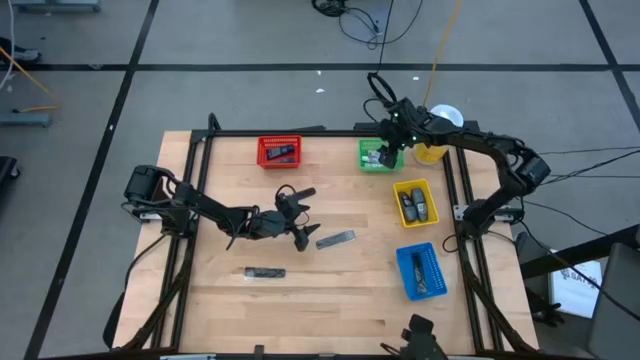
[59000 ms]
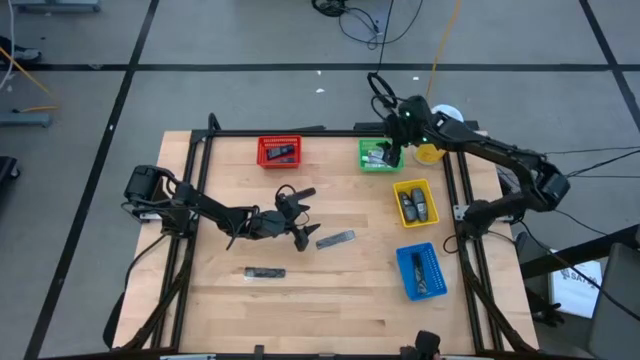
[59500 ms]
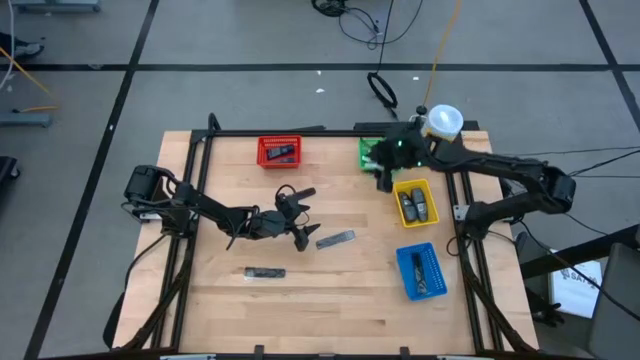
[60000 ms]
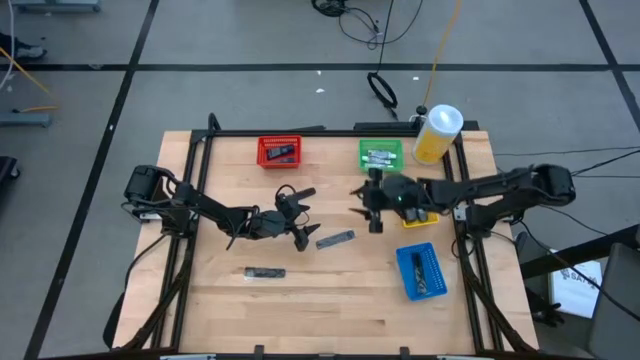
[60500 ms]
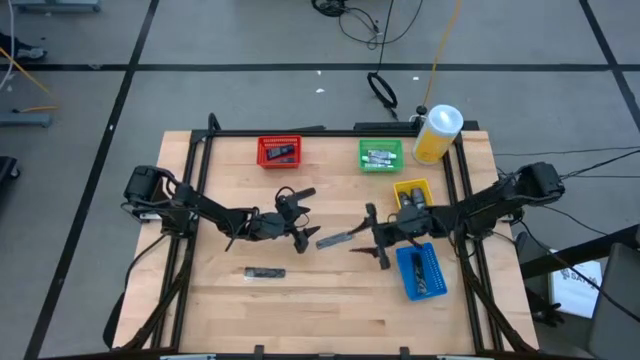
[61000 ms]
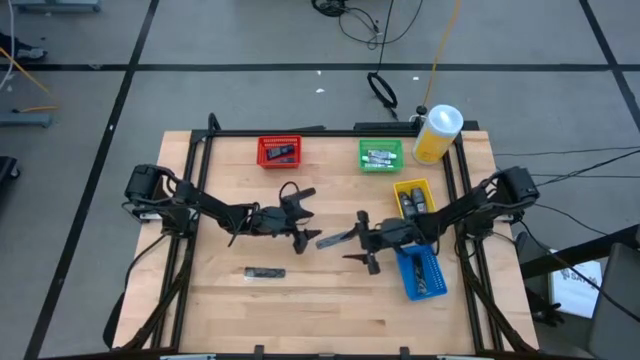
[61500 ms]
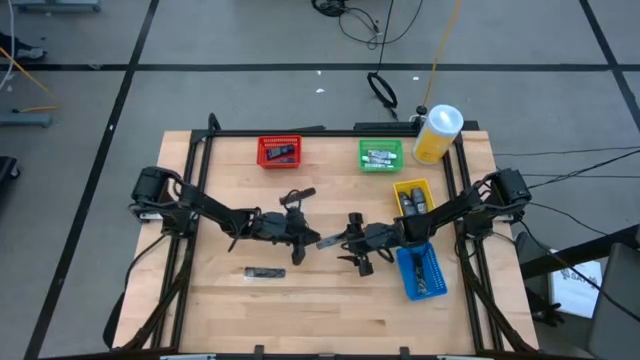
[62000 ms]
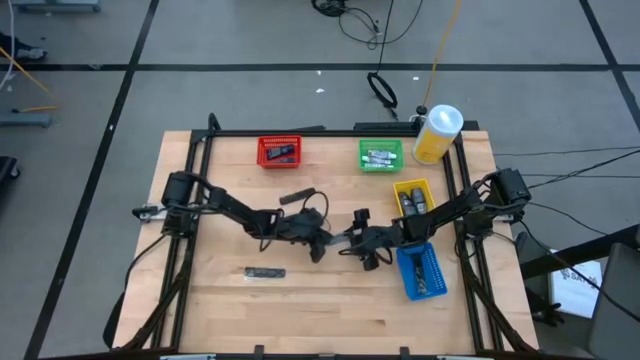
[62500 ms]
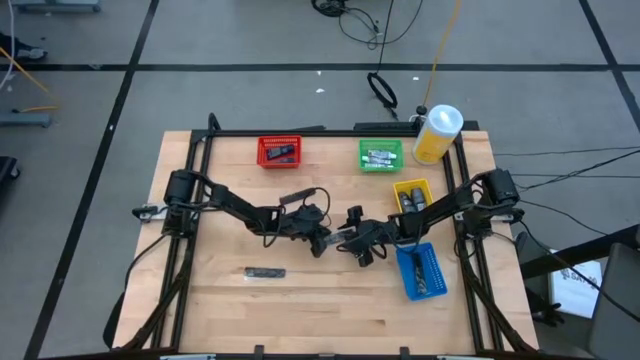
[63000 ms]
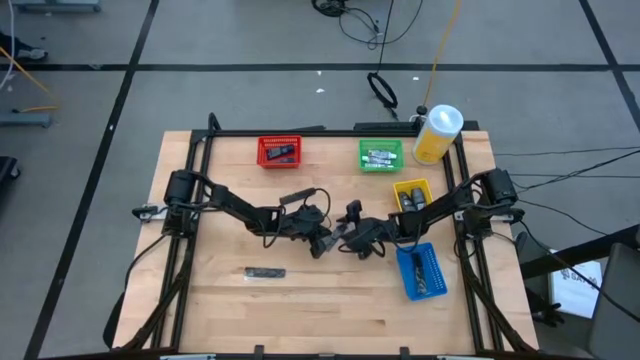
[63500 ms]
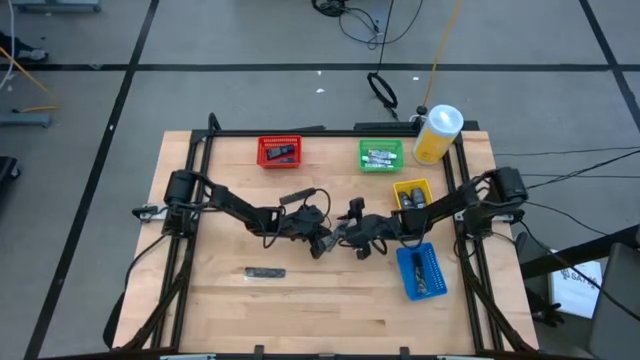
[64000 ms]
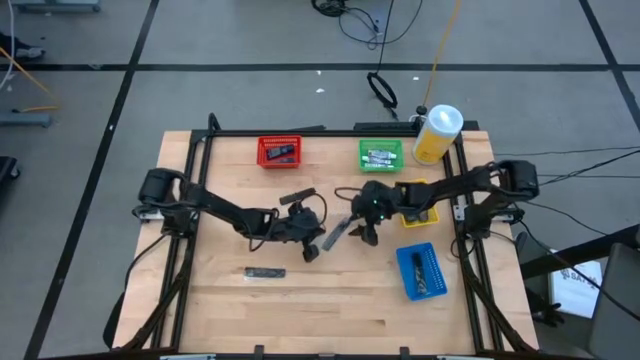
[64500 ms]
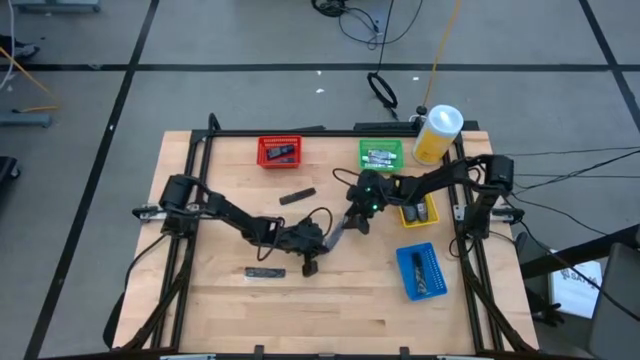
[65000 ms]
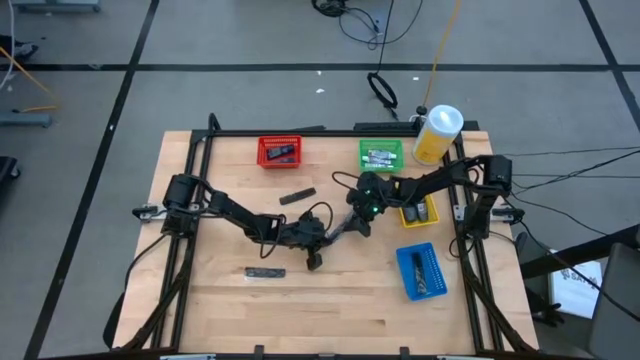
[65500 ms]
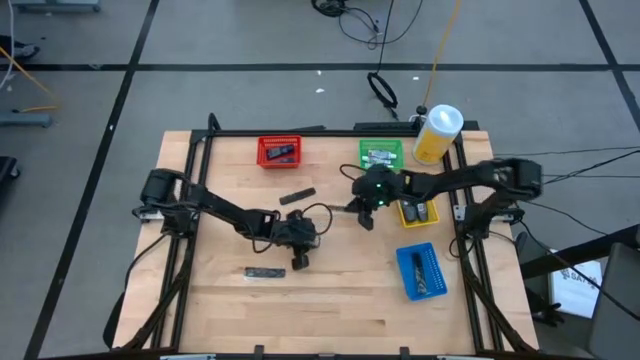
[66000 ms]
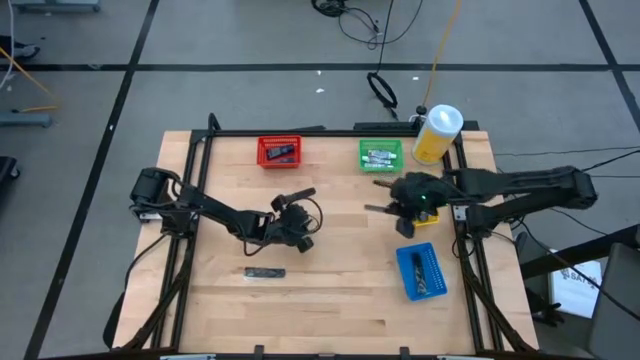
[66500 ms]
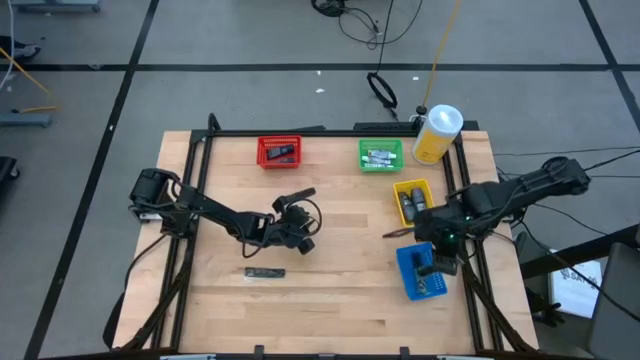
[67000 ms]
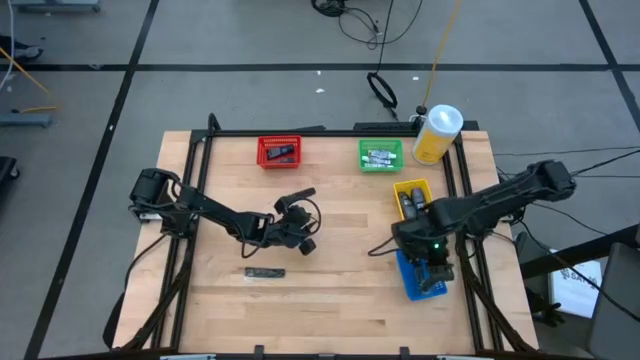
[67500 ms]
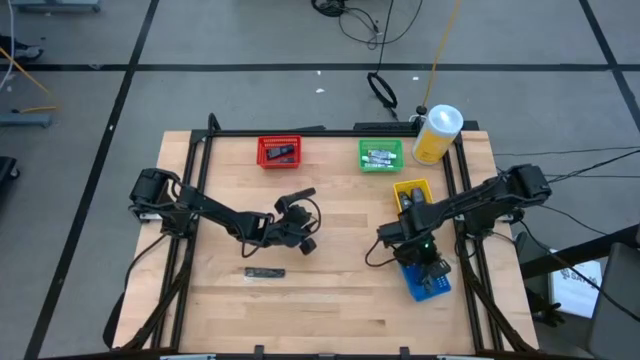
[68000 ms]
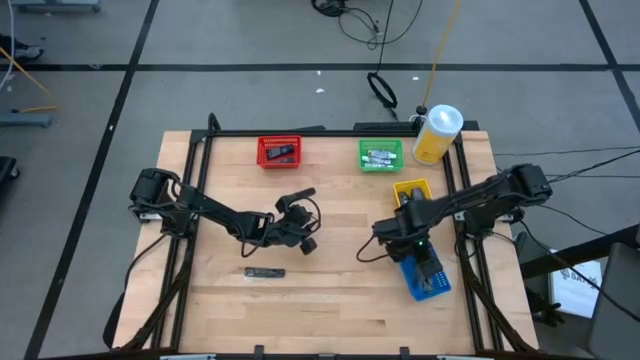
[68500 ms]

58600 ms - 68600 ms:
Task: Pick & Place Travel size toiletries
Put the black comb into the blue bin

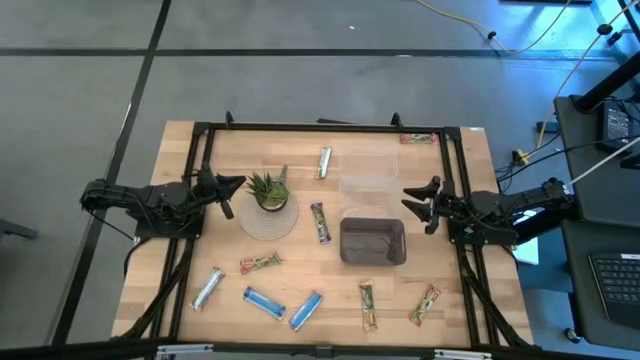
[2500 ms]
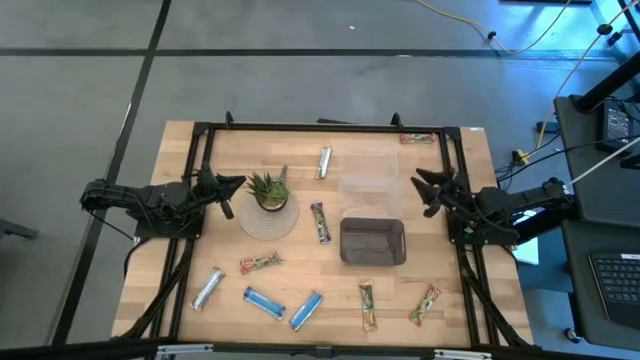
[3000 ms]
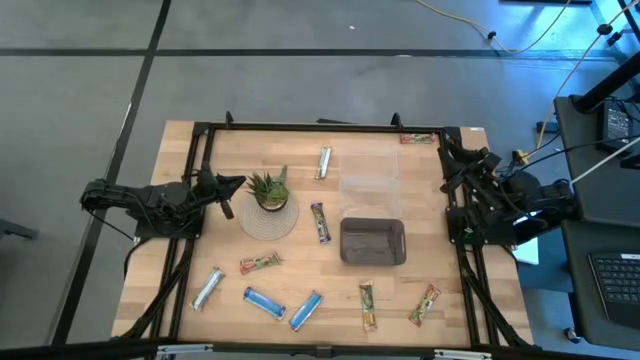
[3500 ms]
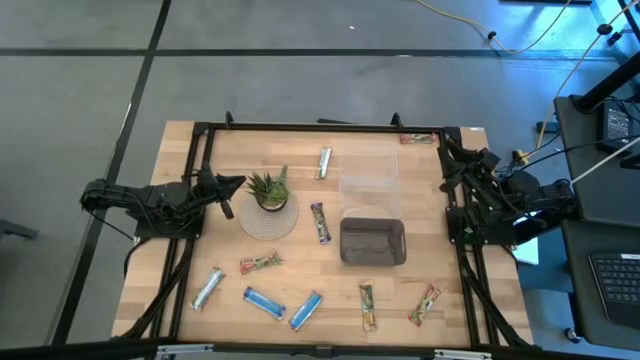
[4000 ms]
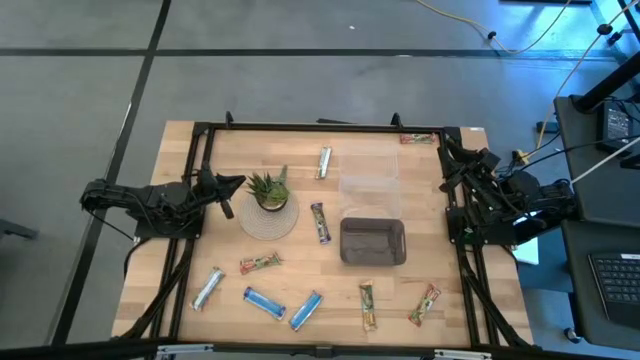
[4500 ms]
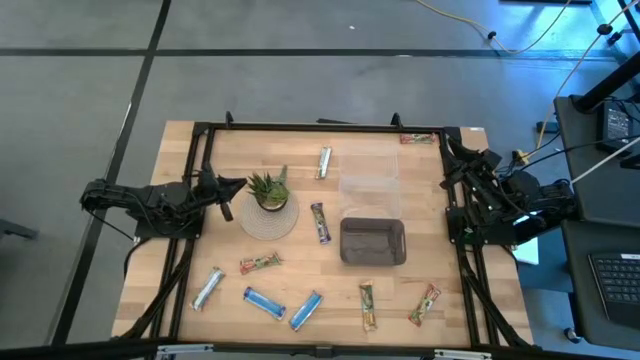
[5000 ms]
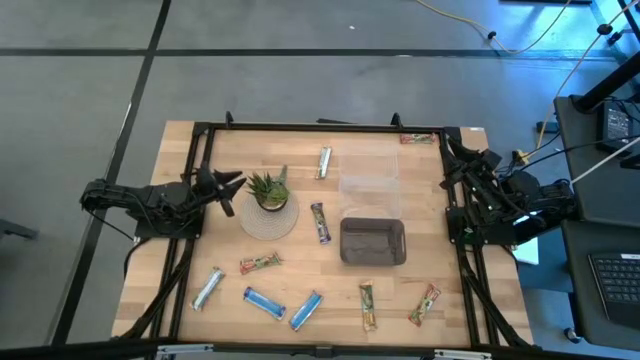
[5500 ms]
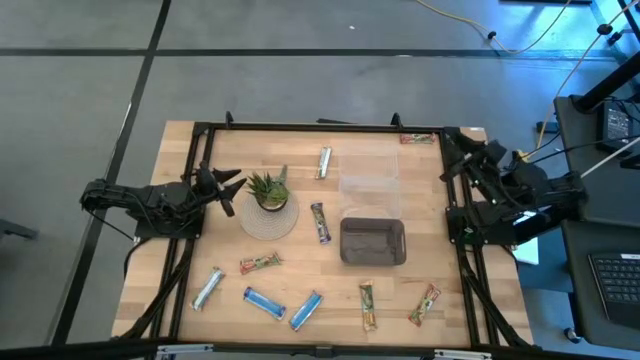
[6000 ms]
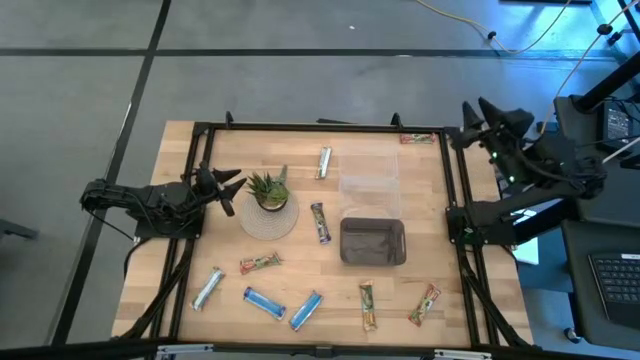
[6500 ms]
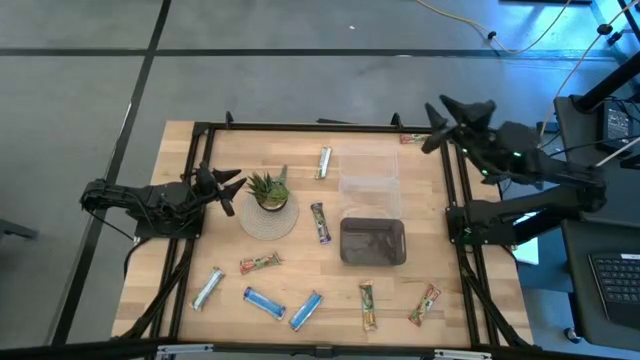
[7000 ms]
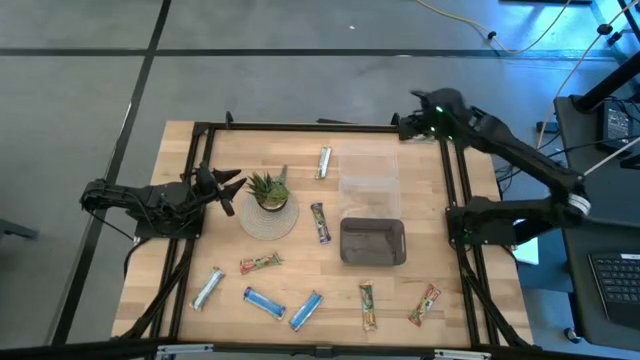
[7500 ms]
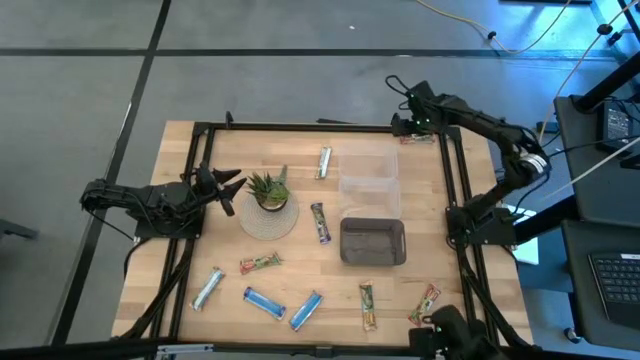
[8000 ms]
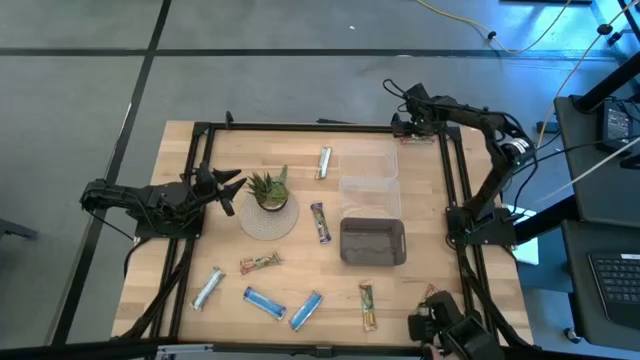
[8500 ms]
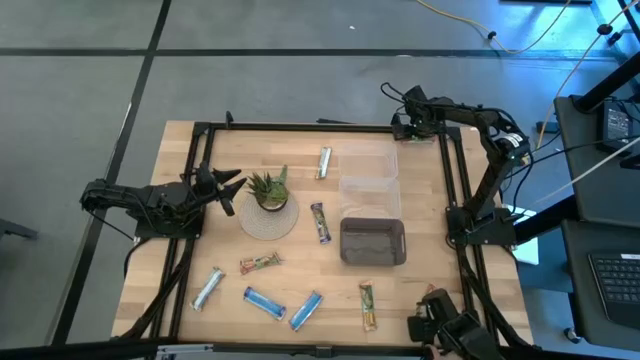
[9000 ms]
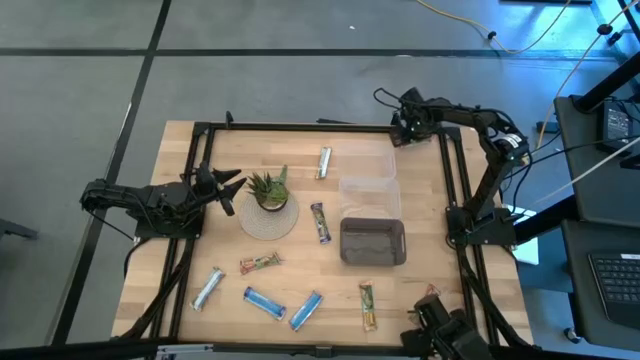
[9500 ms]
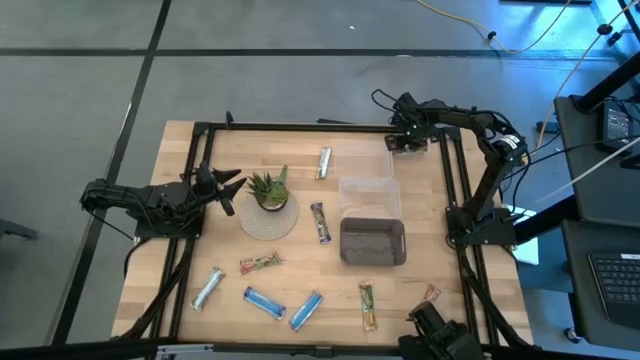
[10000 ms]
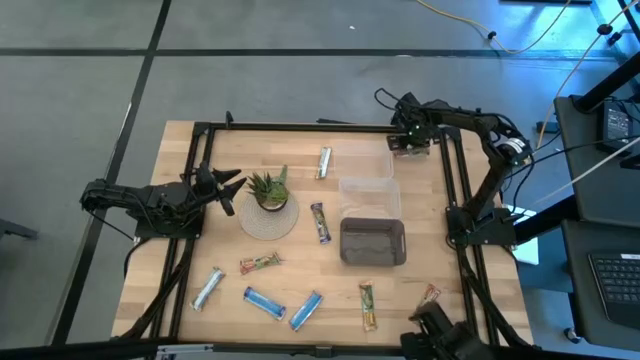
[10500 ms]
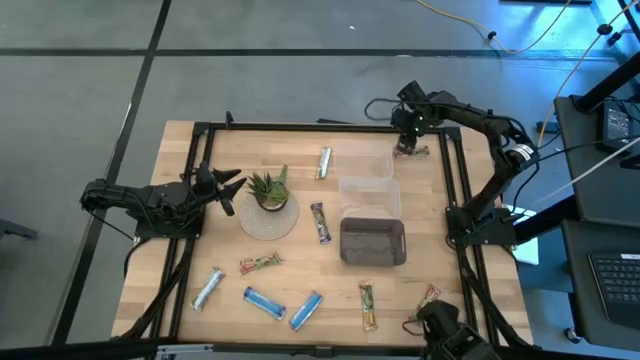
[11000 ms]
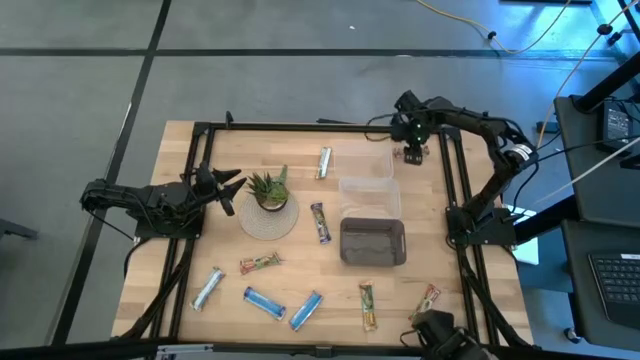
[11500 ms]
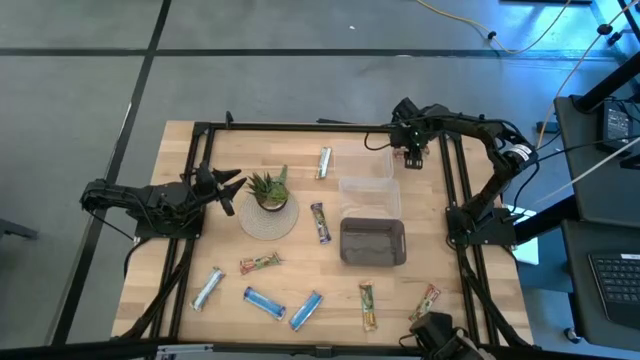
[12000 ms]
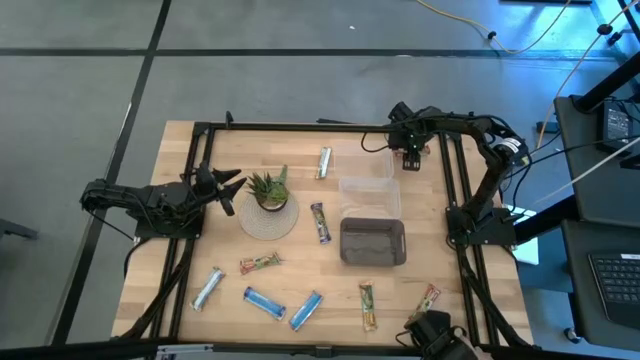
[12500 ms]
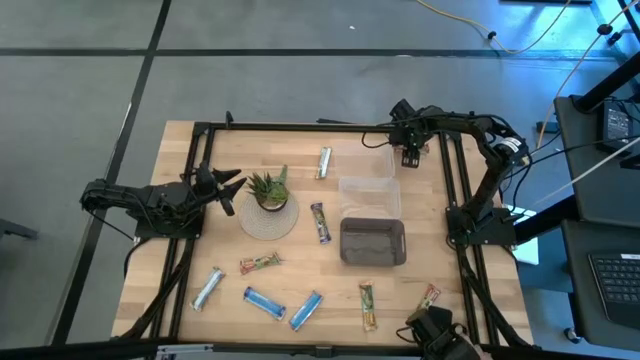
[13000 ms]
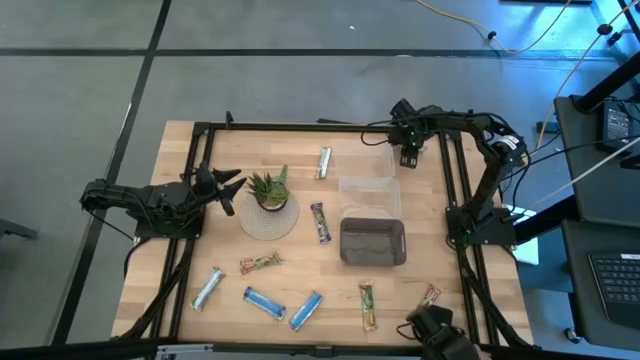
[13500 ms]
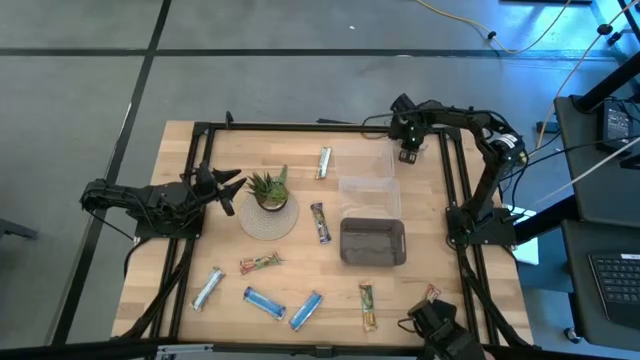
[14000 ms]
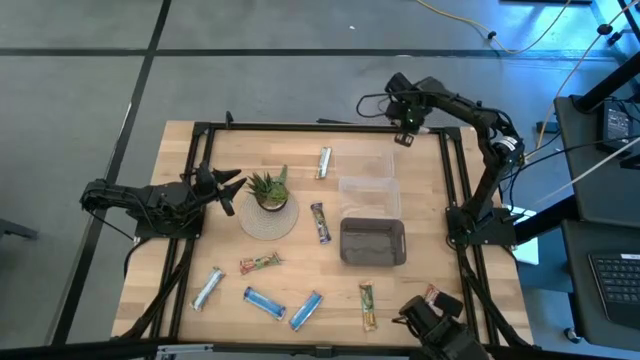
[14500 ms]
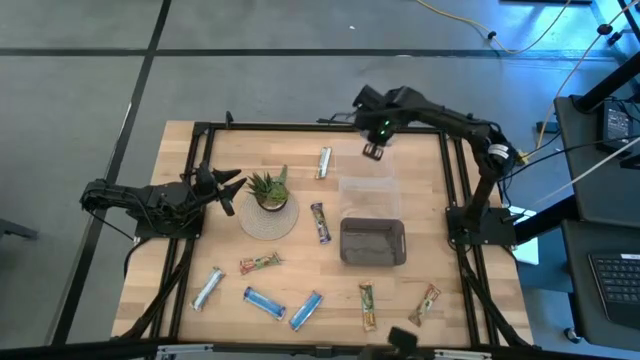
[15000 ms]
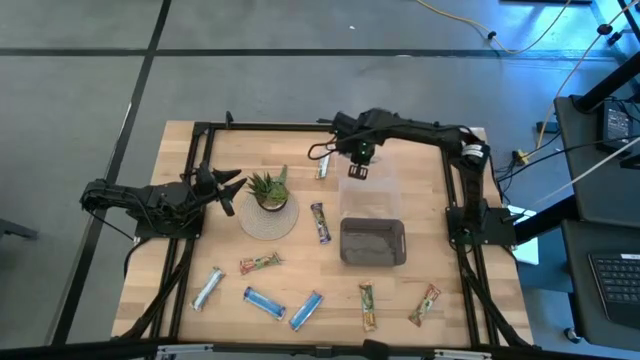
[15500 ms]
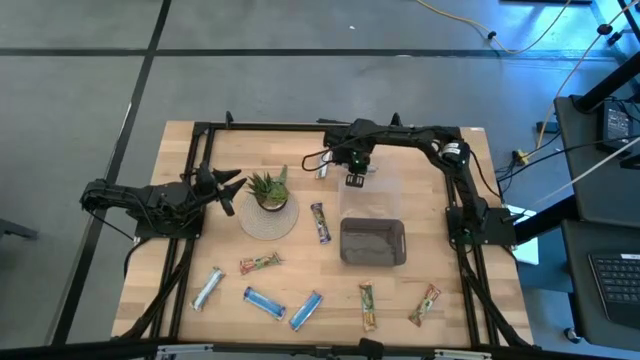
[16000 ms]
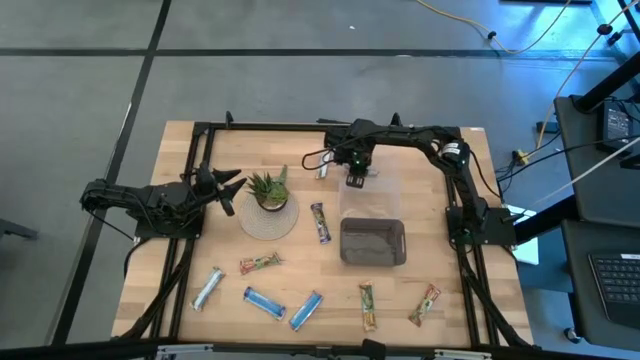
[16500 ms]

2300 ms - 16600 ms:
Task: Pick and place Granola Bars by type
Put the top red granola bar into the top transparent bin
